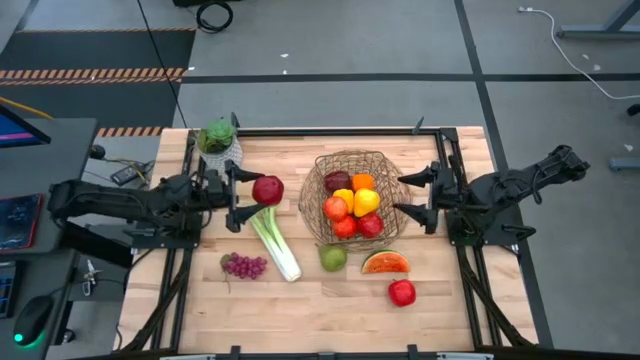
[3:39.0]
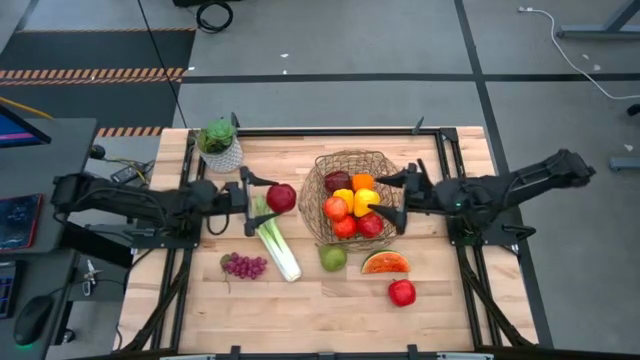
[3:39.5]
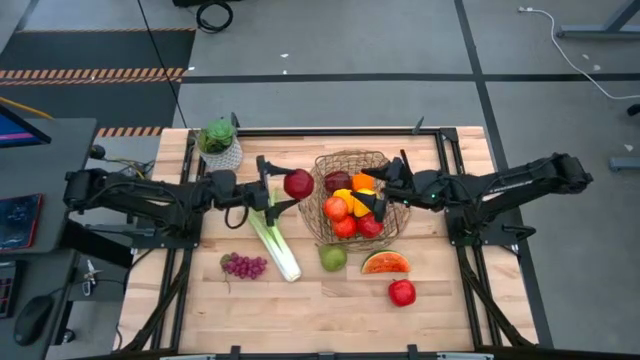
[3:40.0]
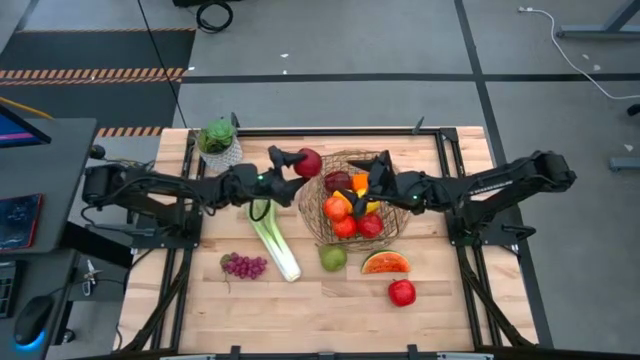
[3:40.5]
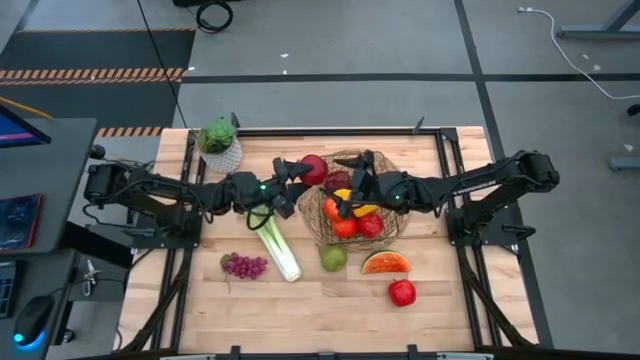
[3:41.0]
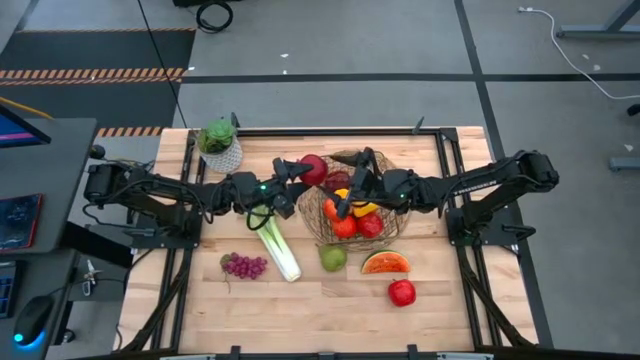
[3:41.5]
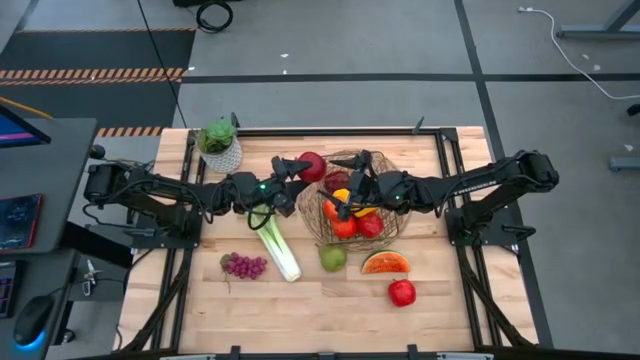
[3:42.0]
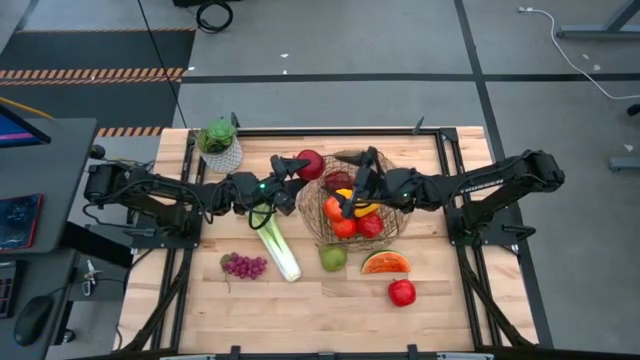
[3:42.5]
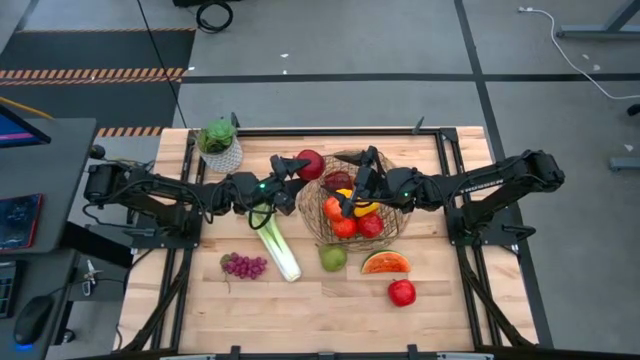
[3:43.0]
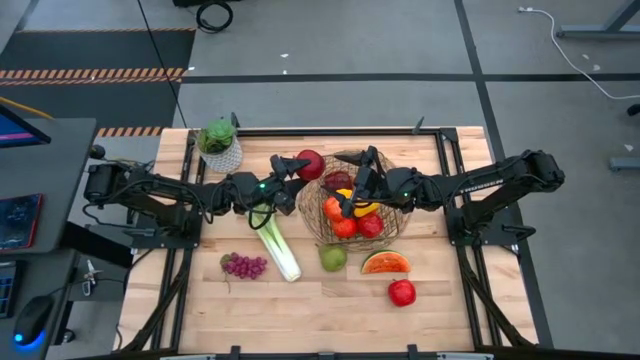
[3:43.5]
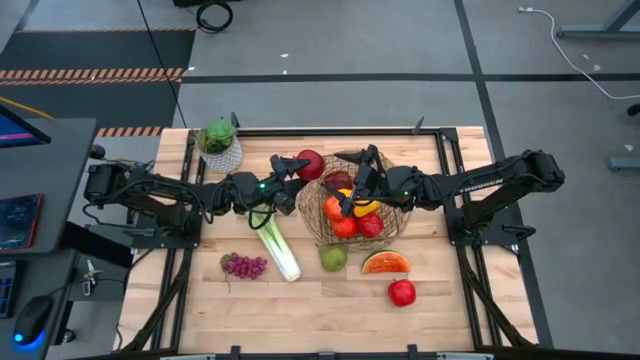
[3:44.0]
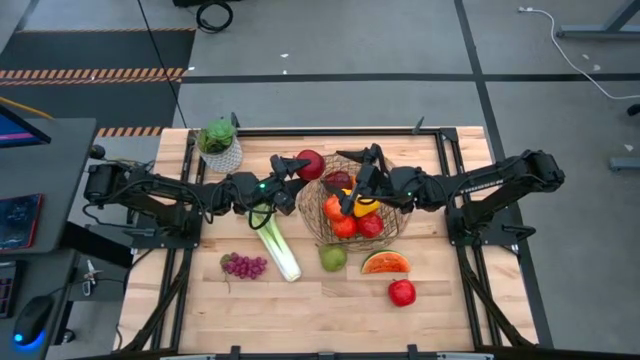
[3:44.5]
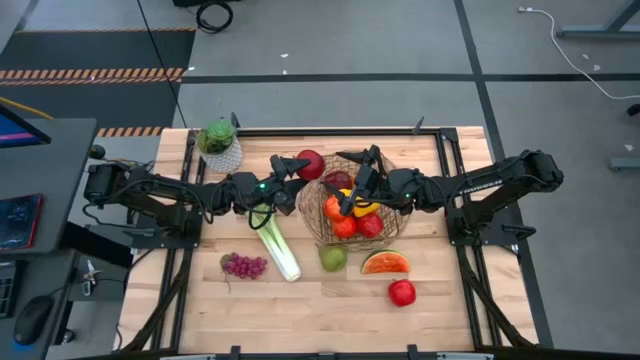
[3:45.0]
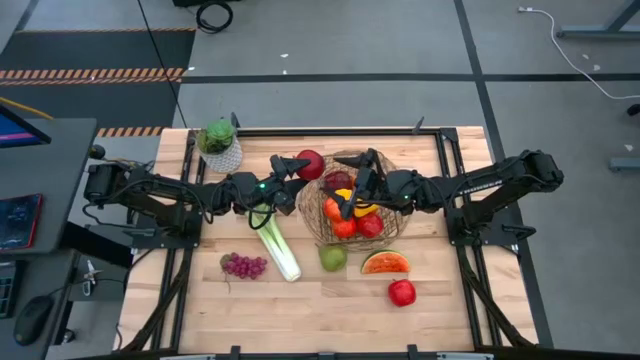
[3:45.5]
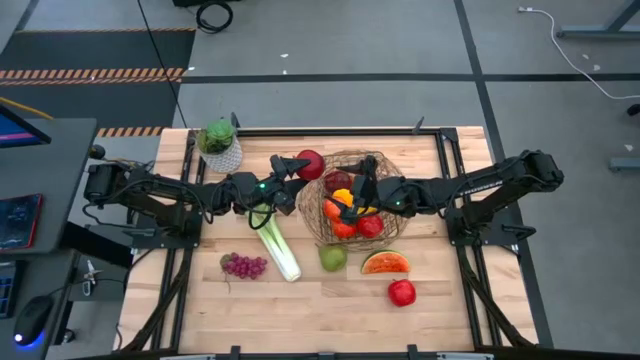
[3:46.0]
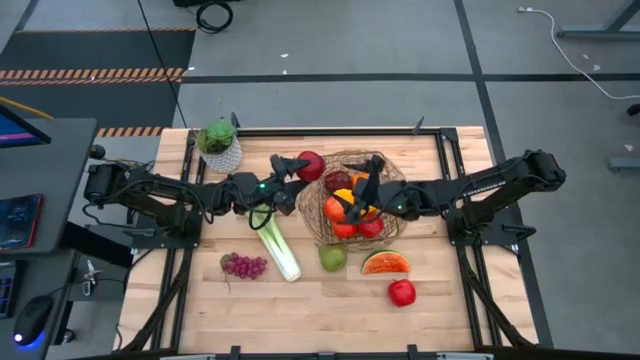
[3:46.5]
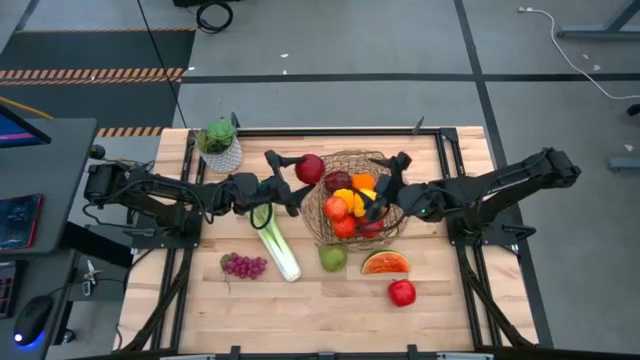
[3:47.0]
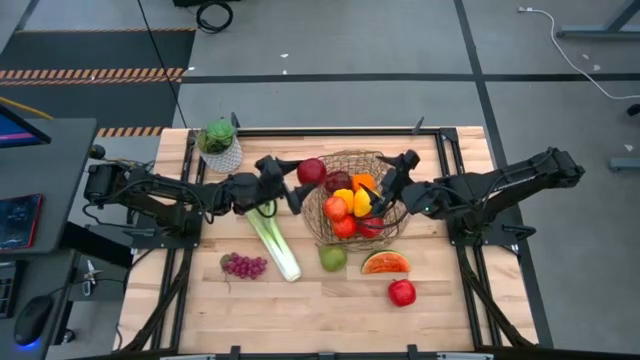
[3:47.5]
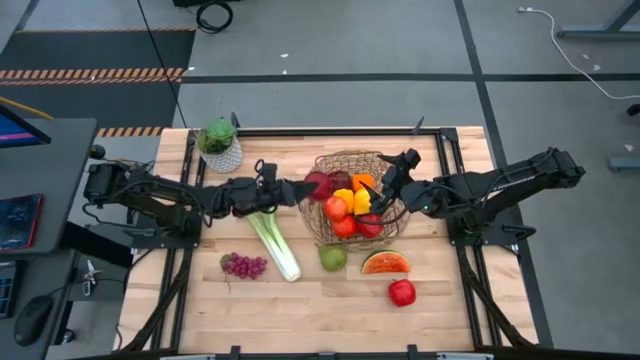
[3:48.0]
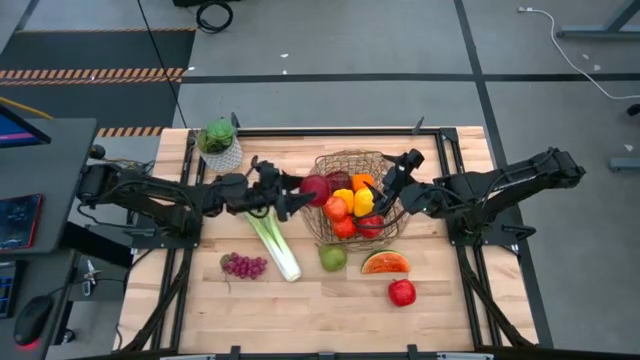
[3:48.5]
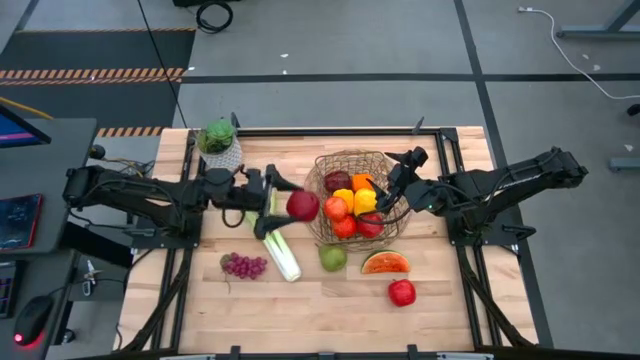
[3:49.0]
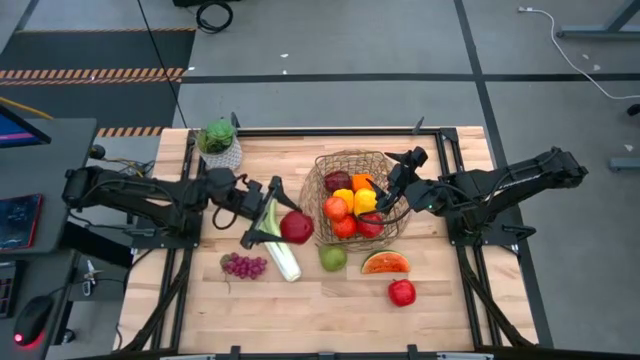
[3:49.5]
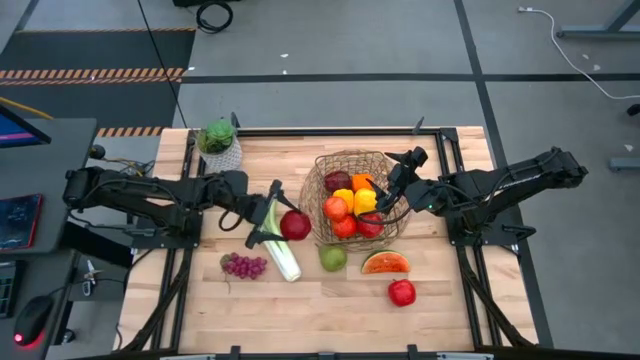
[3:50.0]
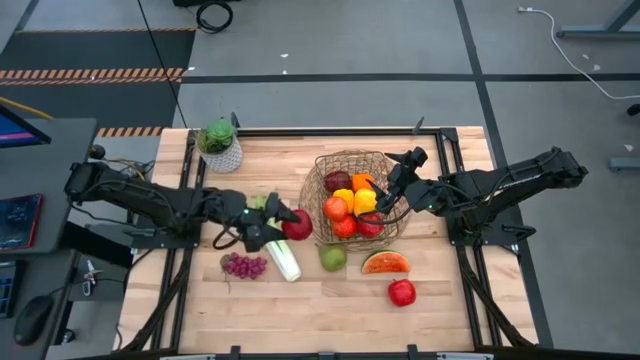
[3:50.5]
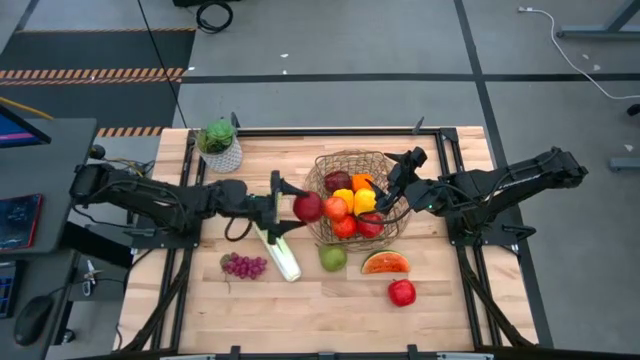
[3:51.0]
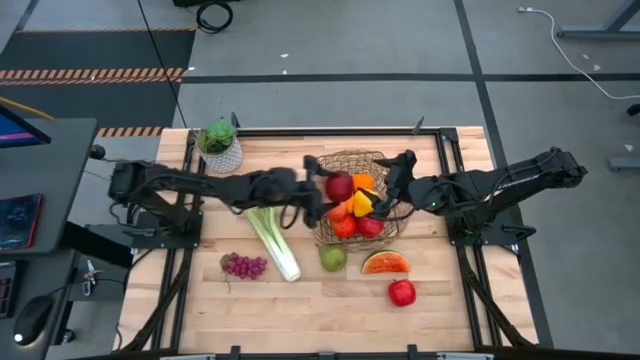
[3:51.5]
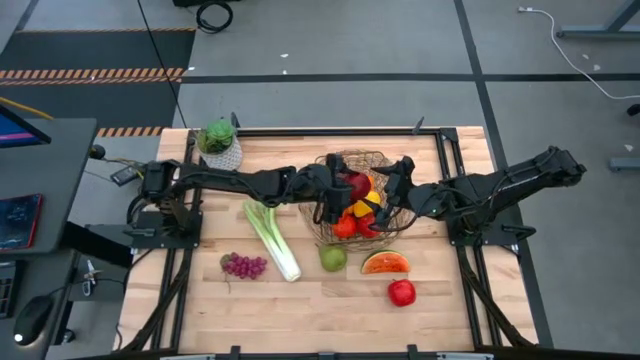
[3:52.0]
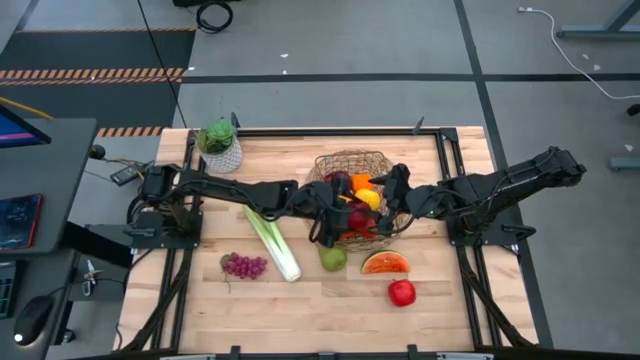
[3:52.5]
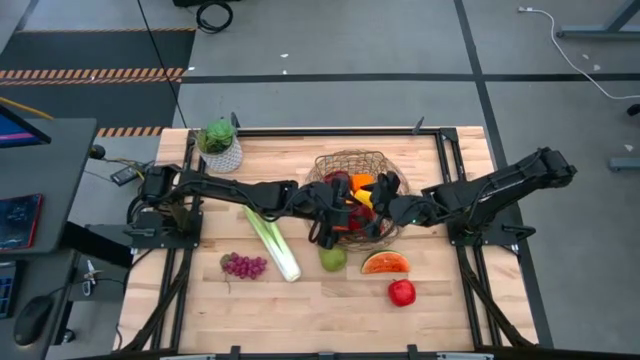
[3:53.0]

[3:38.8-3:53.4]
Task: Build produce basket
Put the red pomegranate into the brown wire basket

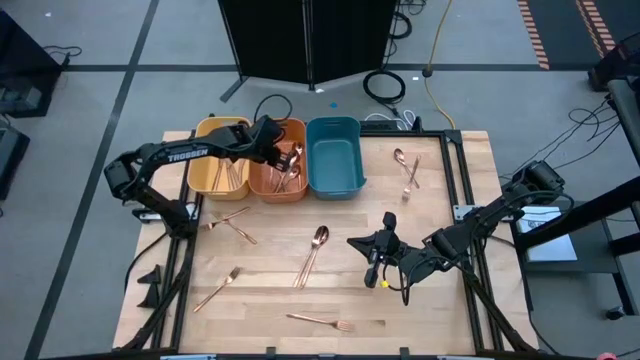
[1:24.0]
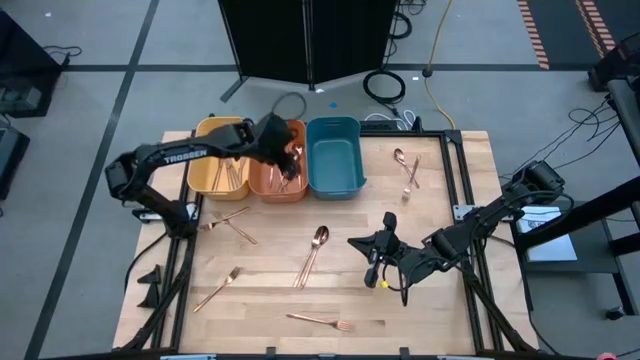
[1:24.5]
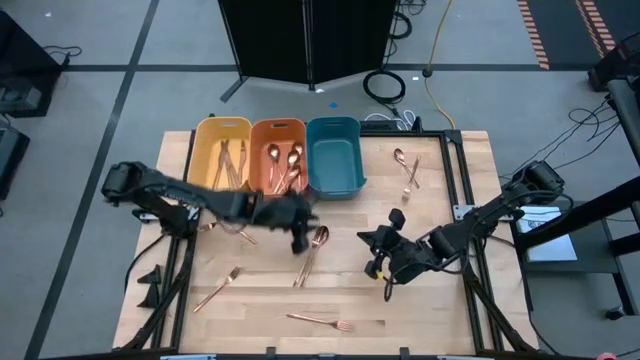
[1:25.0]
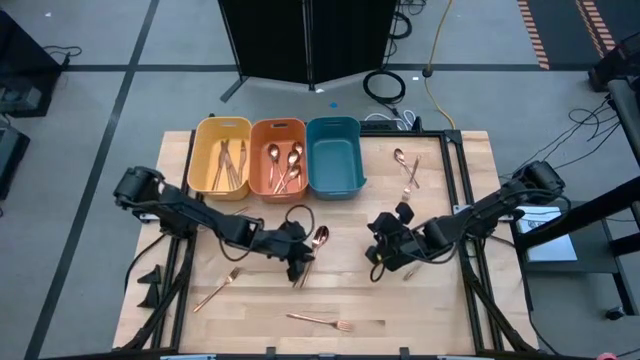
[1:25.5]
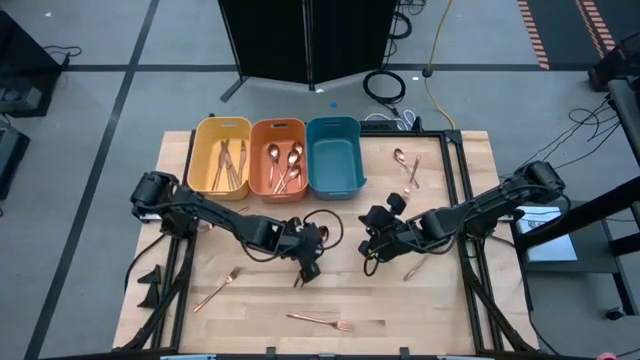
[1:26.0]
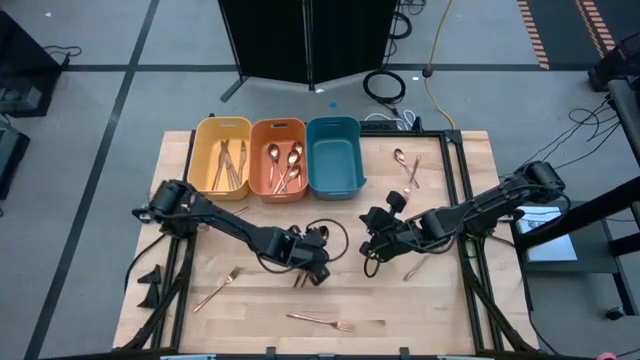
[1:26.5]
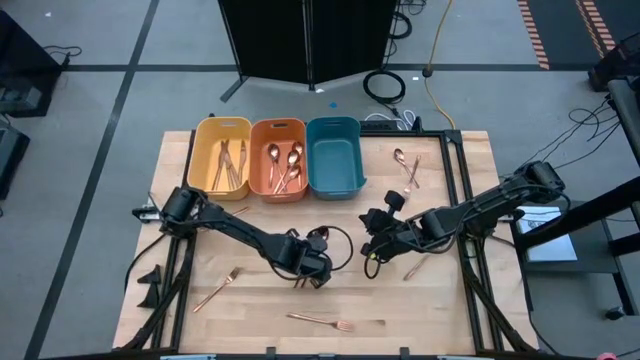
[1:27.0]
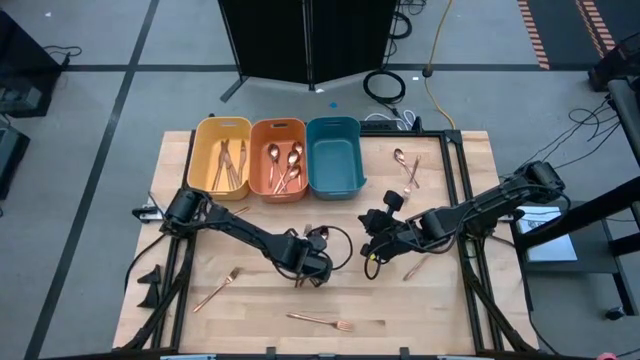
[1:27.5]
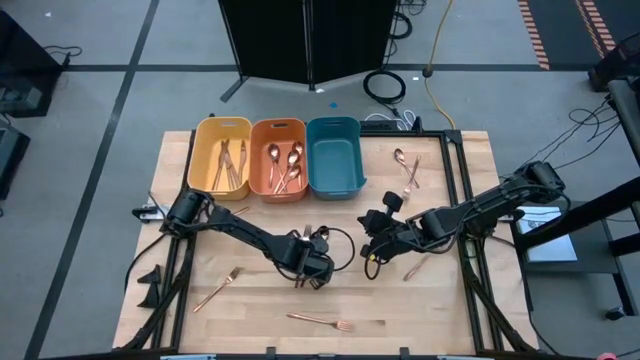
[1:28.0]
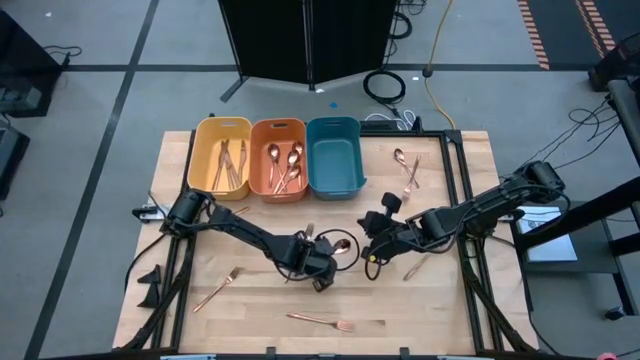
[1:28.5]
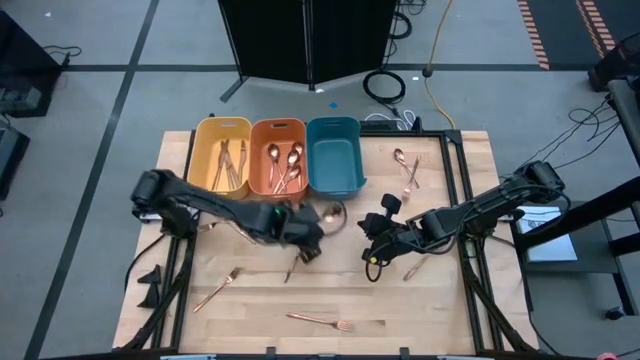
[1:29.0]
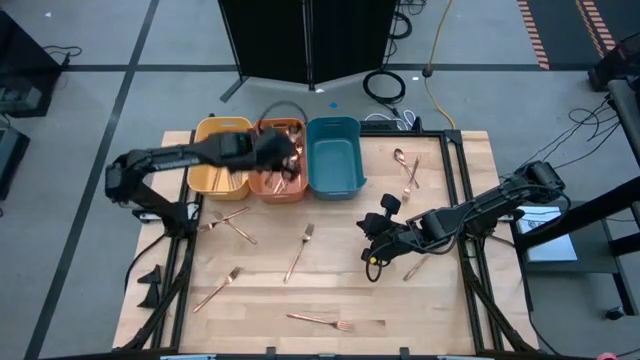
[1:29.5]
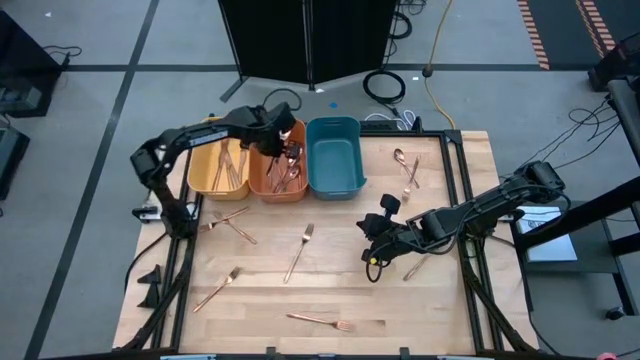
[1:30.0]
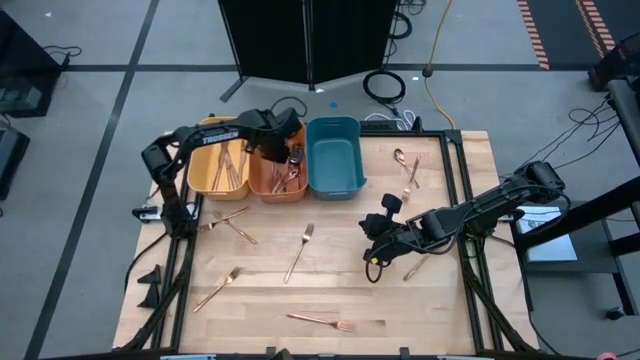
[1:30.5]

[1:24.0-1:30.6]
Task: Sort silverware
Put the gold spoon into the orange bin
